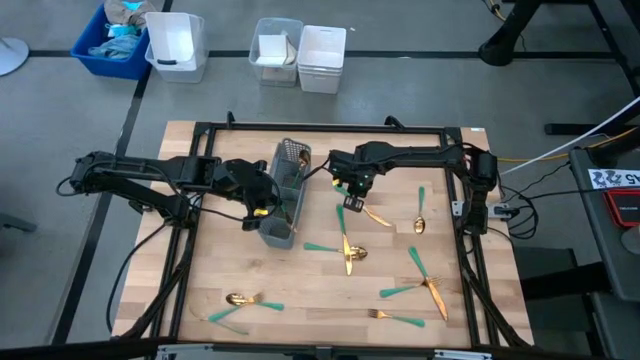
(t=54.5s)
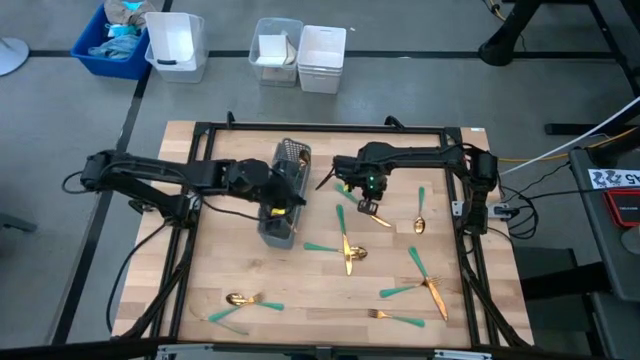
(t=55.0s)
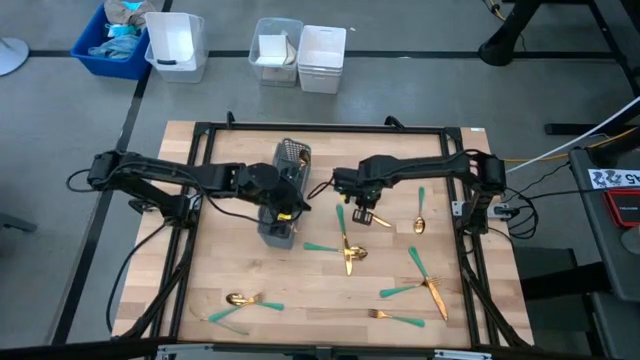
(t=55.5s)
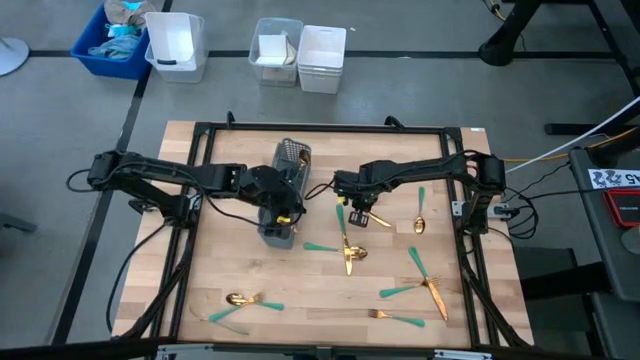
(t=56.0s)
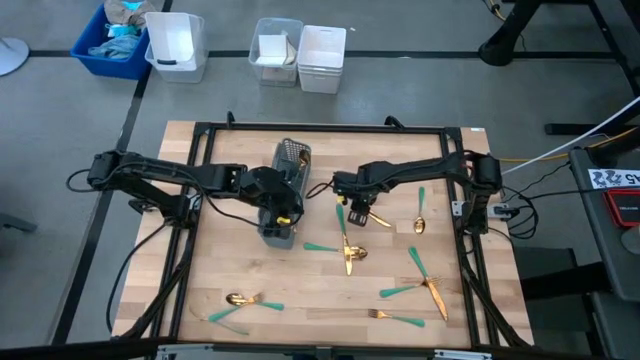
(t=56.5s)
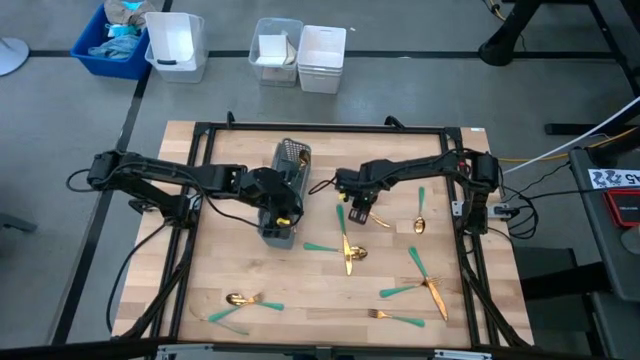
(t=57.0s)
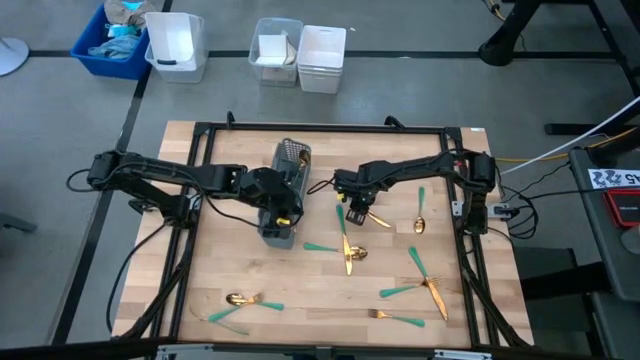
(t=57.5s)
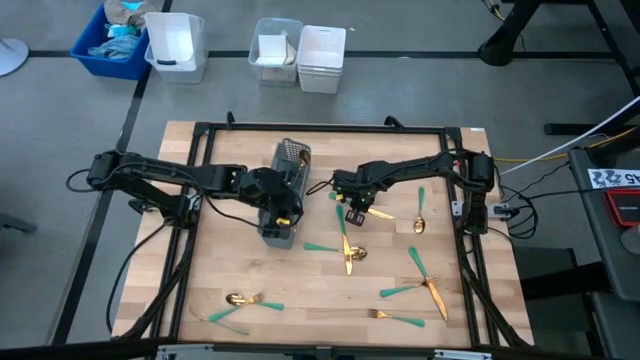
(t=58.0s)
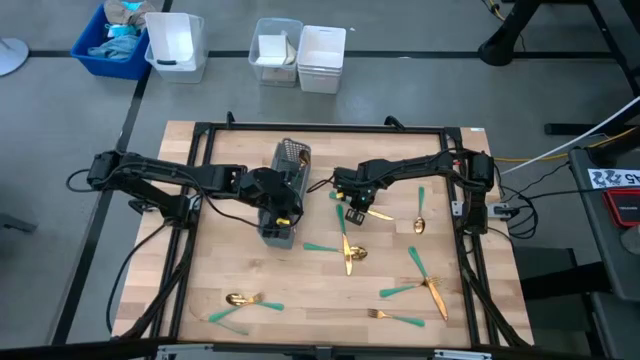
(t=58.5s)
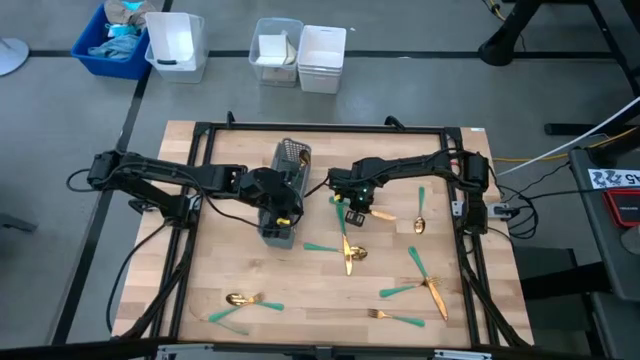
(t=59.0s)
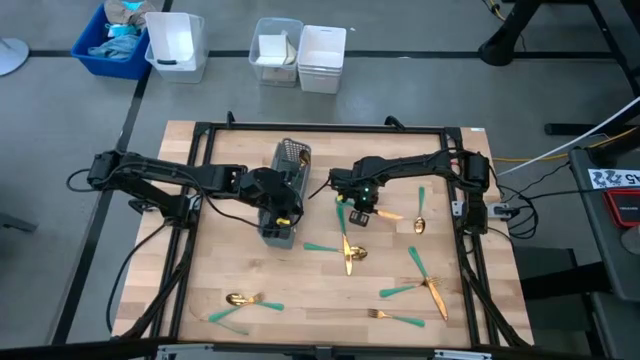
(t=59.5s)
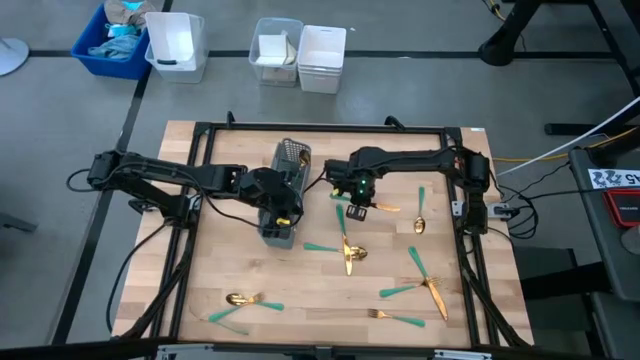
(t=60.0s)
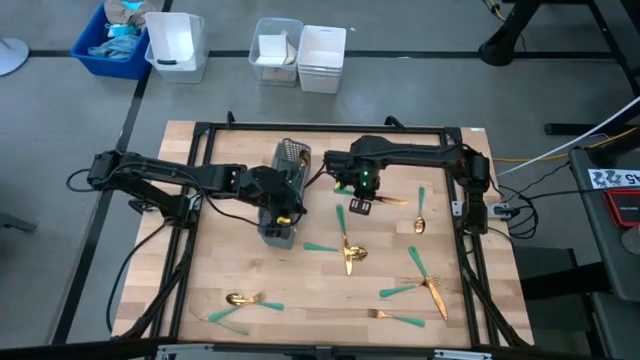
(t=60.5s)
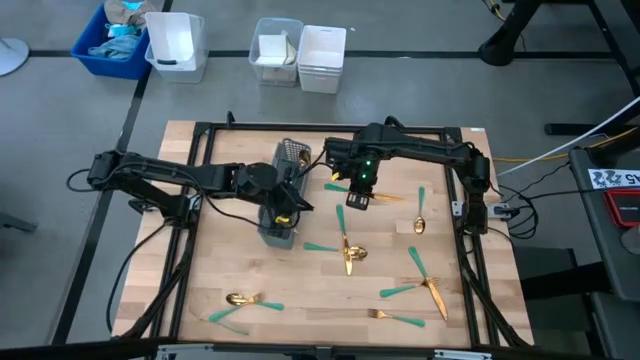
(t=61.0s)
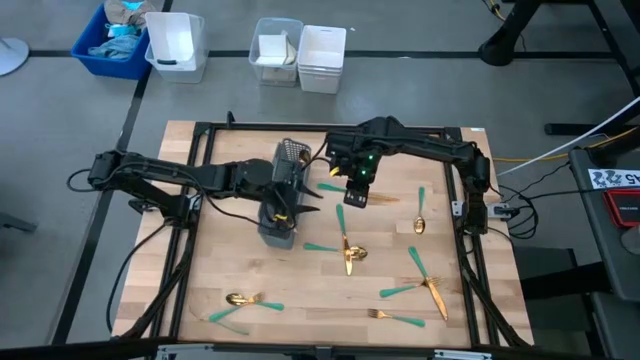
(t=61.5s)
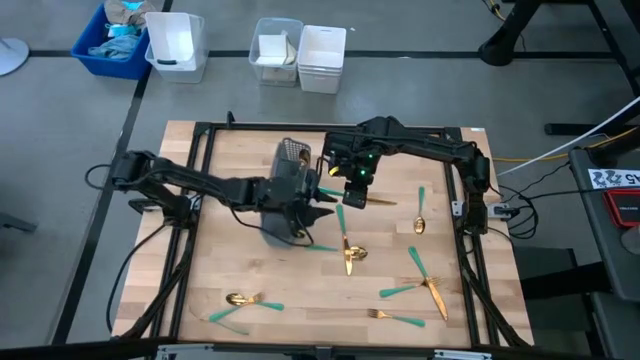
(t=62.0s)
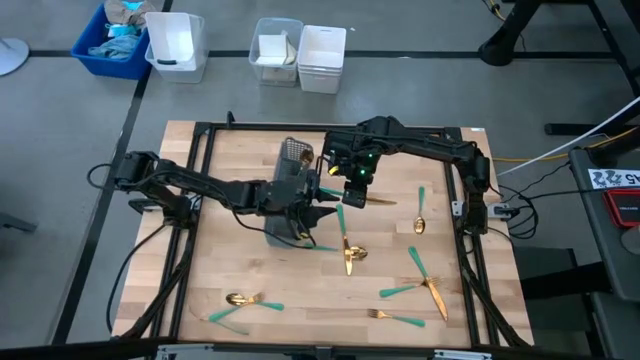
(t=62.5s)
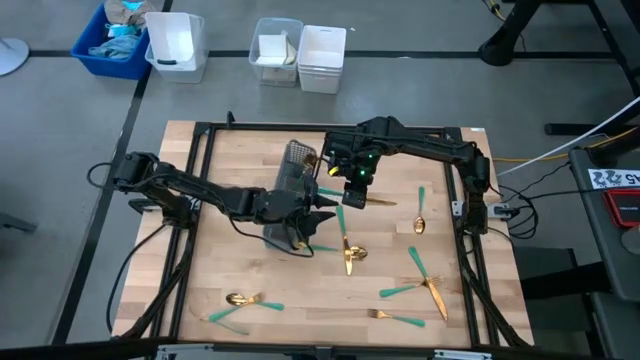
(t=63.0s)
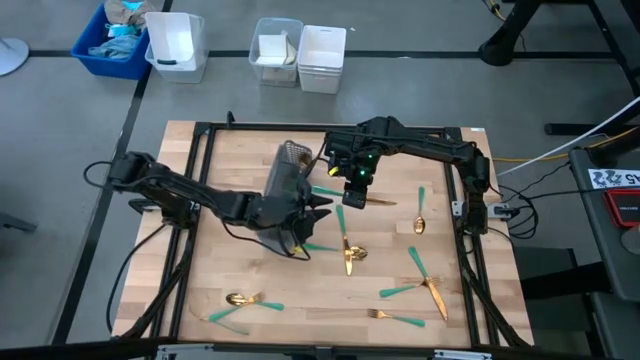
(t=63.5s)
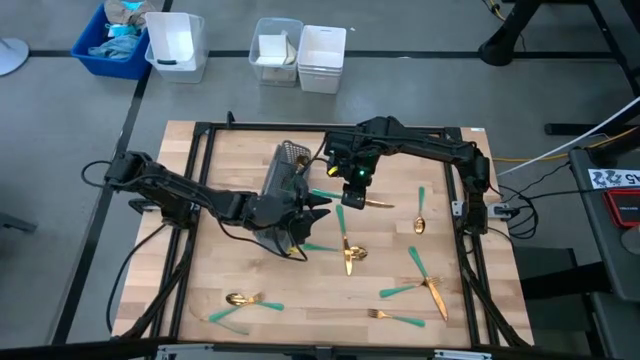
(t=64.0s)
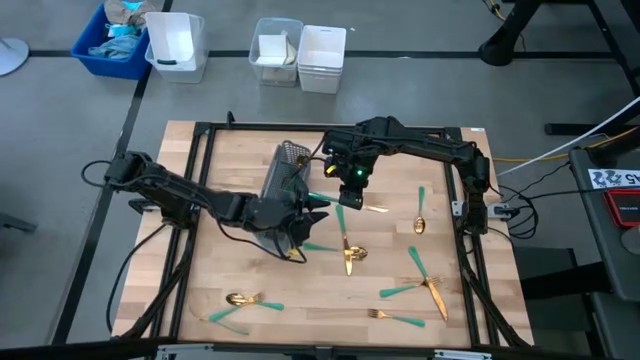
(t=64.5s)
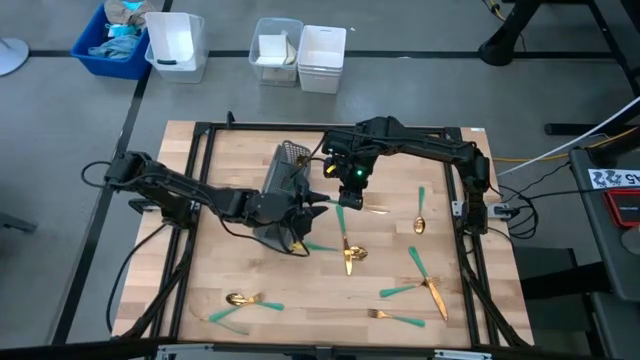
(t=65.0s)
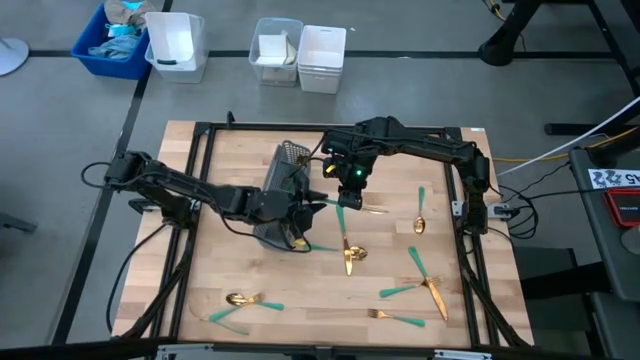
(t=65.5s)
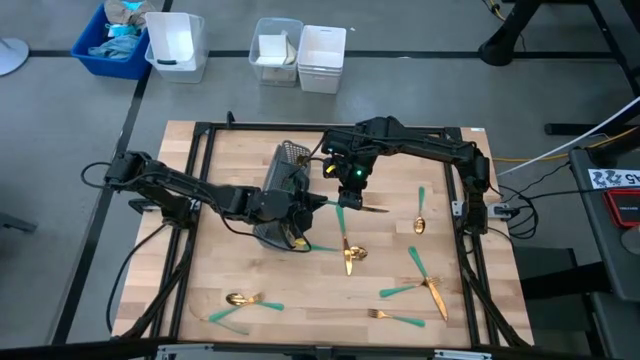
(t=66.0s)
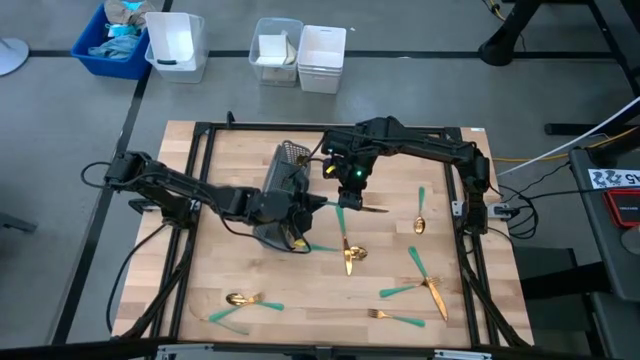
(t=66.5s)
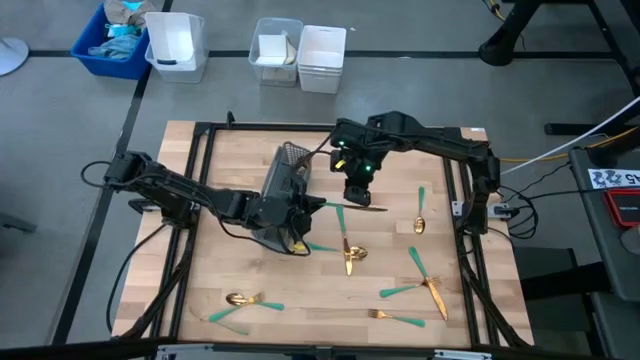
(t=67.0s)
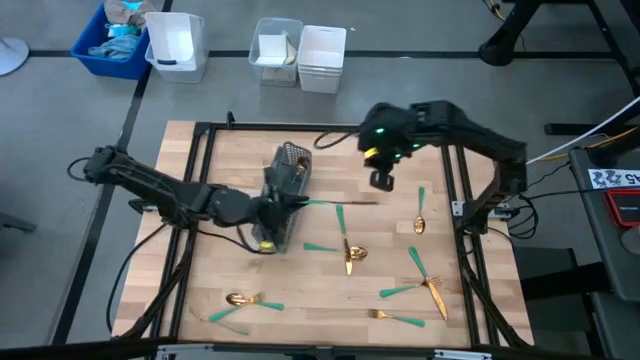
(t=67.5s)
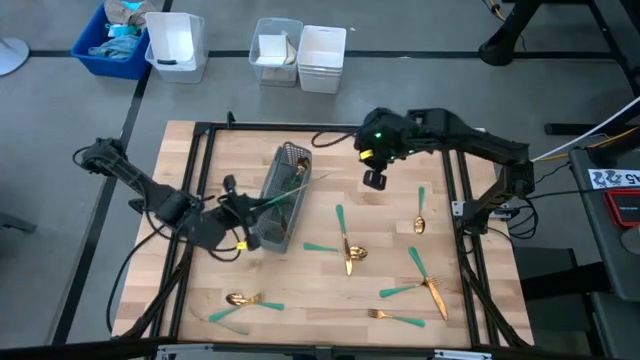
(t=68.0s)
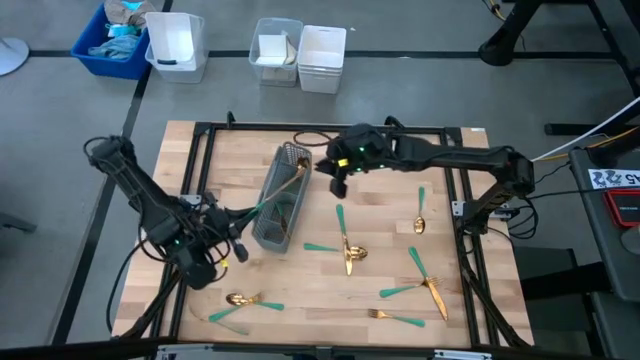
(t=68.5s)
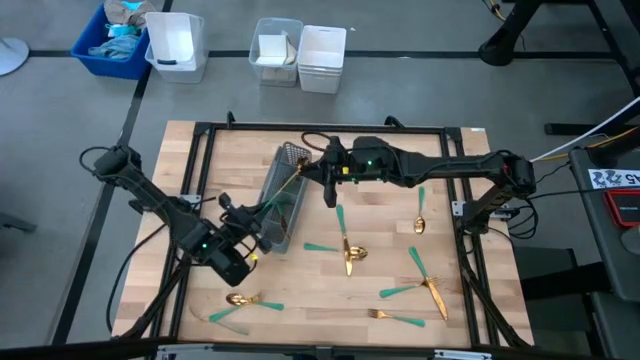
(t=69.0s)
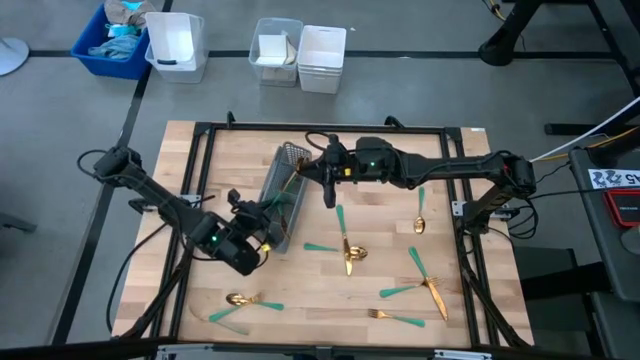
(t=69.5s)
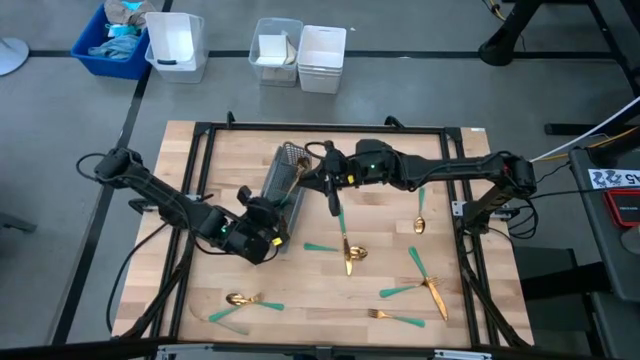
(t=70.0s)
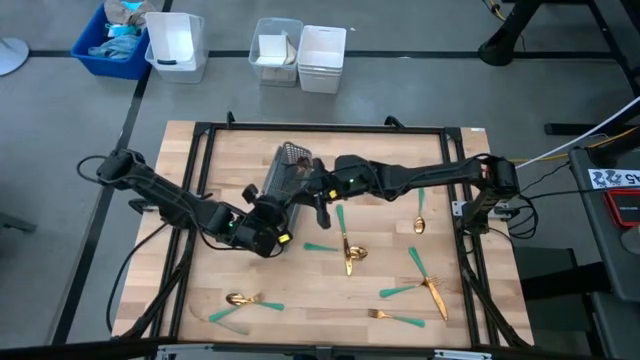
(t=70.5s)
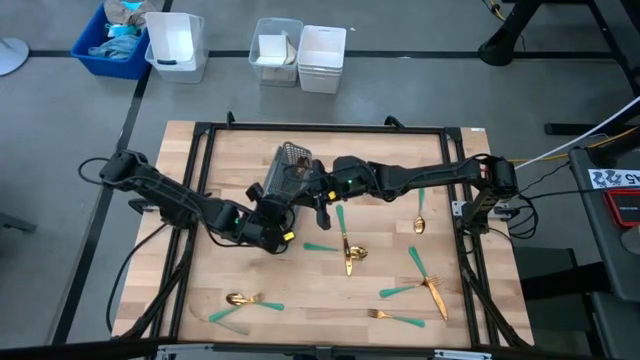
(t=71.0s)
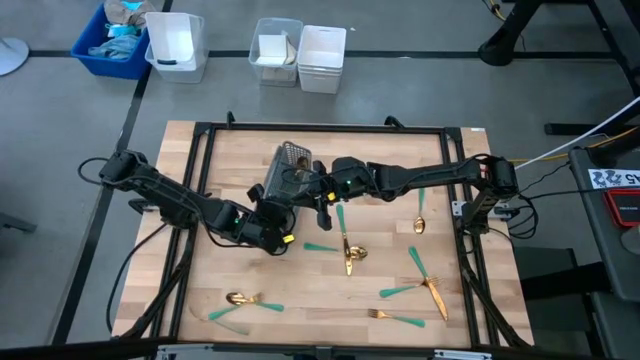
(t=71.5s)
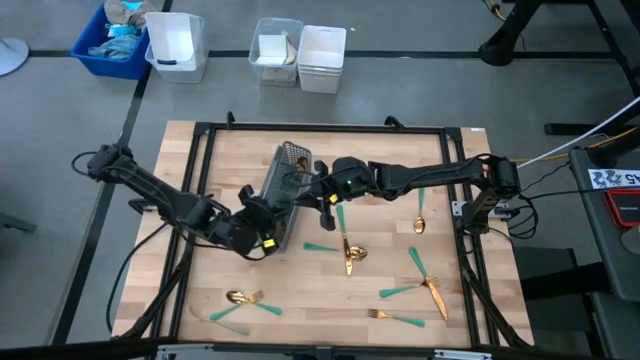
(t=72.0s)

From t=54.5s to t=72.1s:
Task: Sort silverware
Put the green table knife into the gray silverware rack

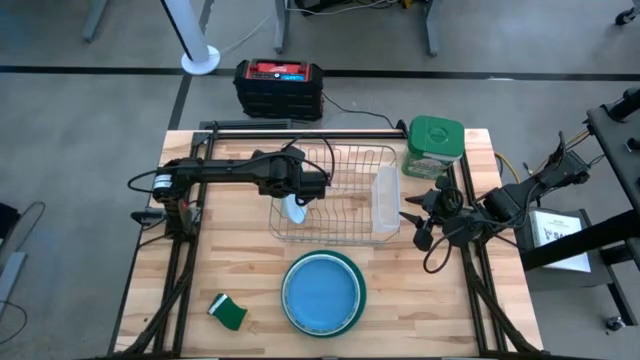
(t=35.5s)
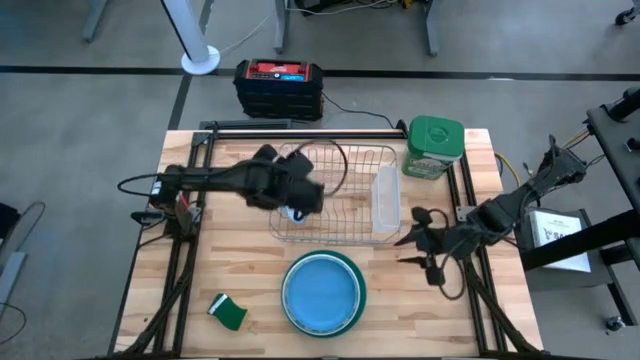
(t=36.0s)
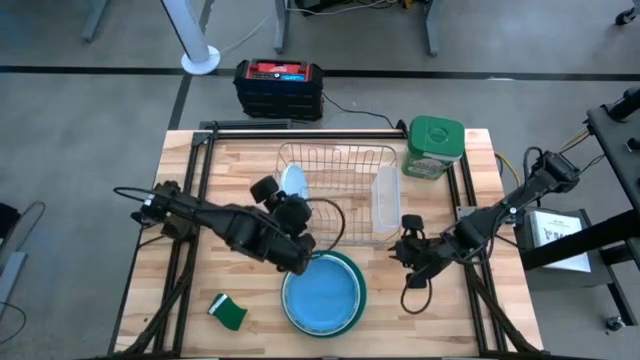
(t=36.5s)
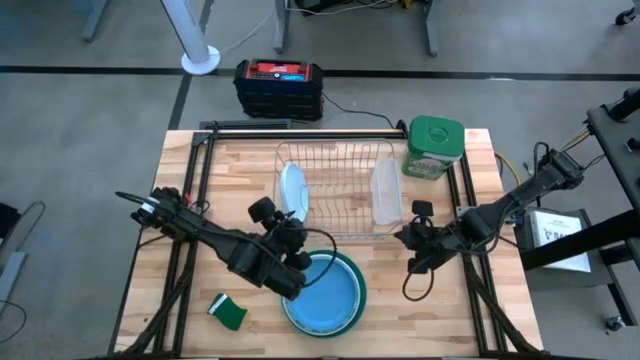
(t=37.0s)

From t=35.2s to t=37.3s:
Task: Sort dishes
Adjust the dish rack
